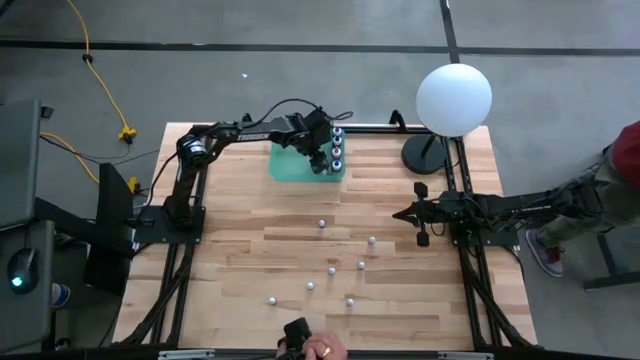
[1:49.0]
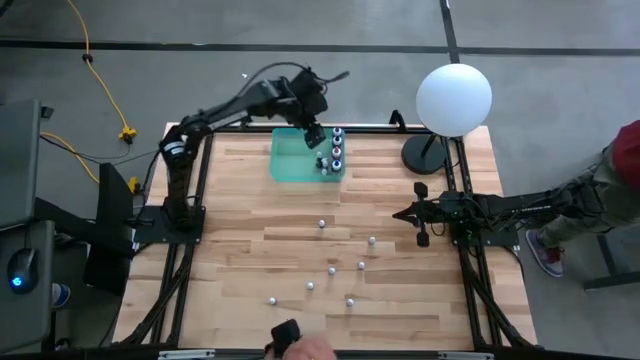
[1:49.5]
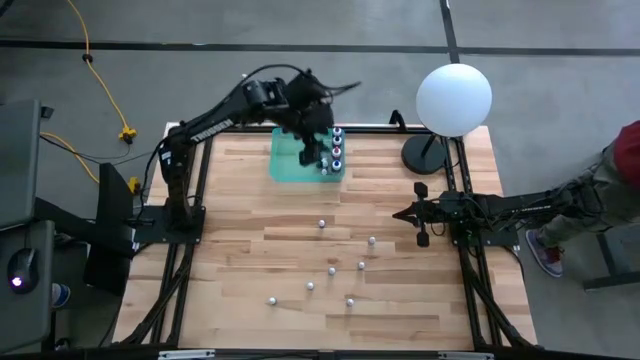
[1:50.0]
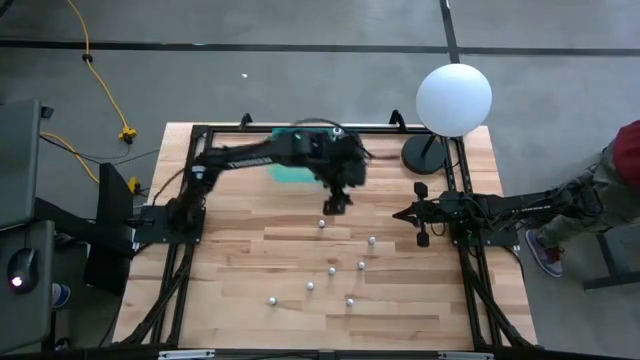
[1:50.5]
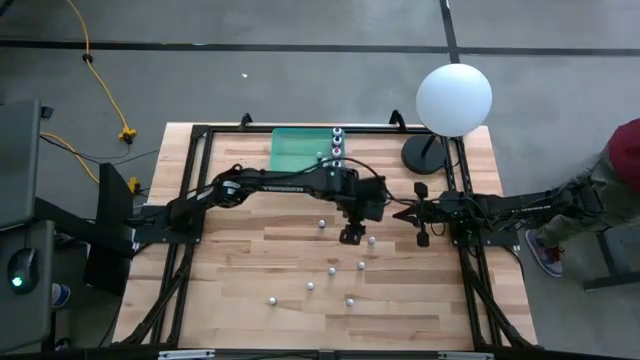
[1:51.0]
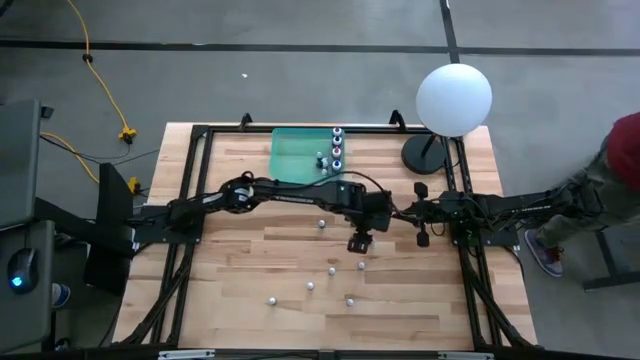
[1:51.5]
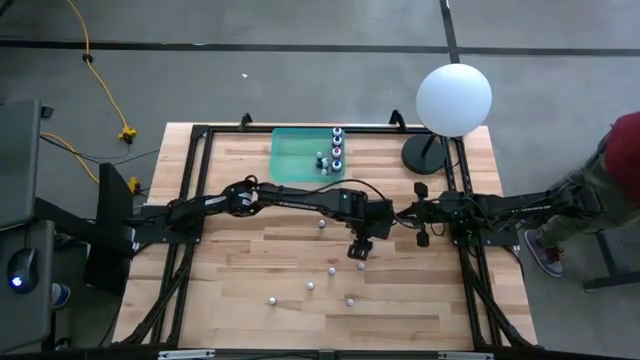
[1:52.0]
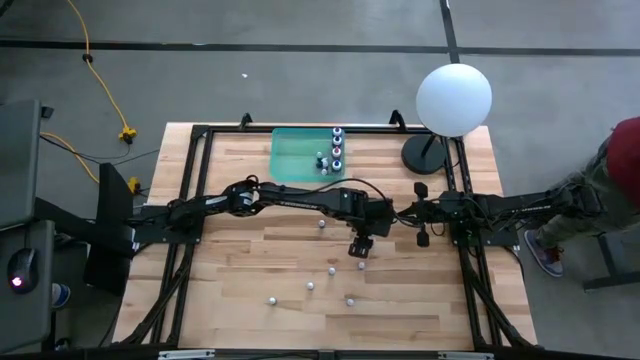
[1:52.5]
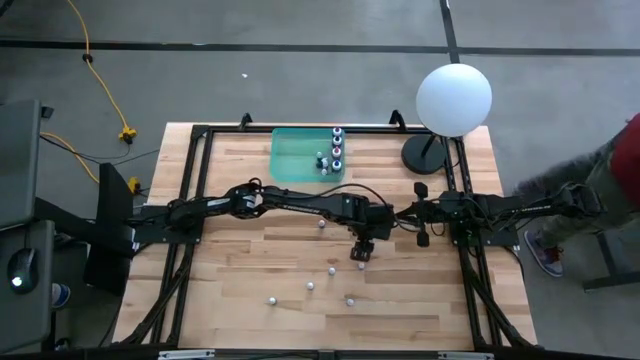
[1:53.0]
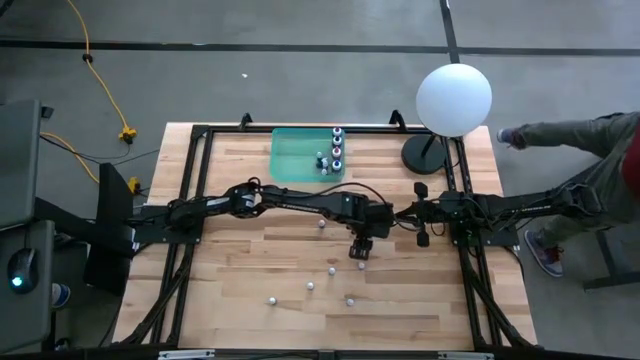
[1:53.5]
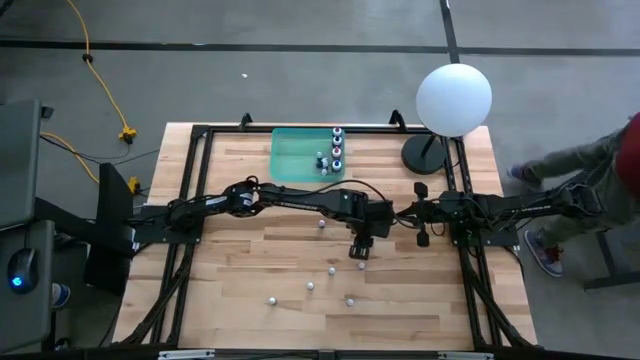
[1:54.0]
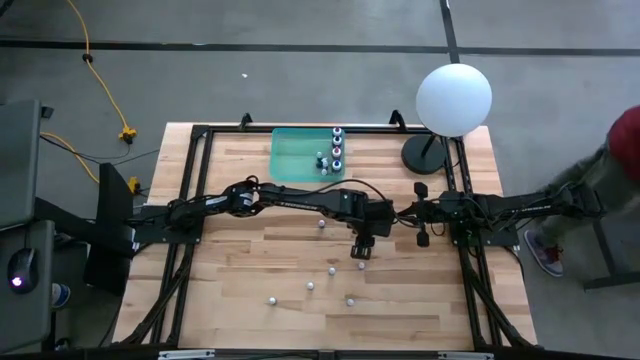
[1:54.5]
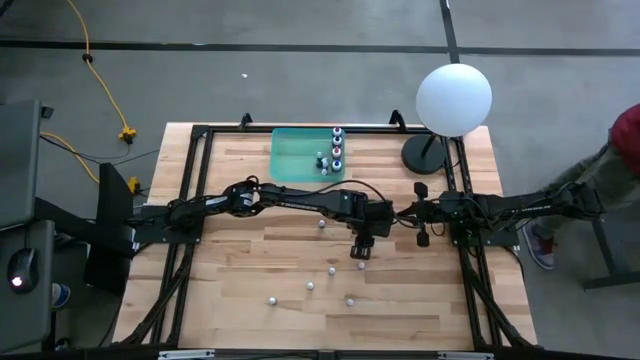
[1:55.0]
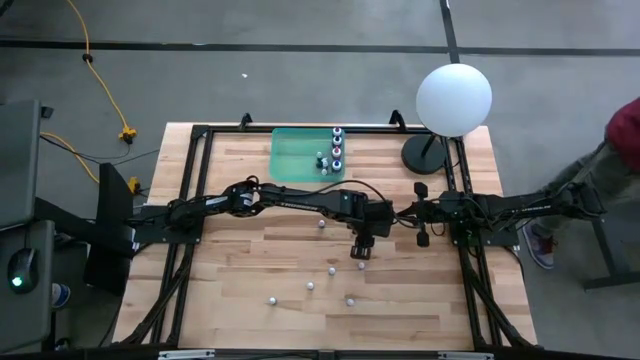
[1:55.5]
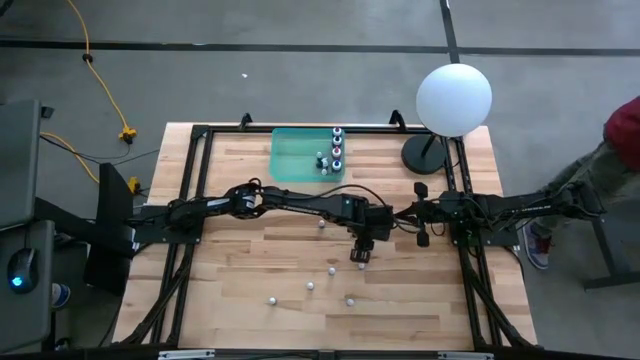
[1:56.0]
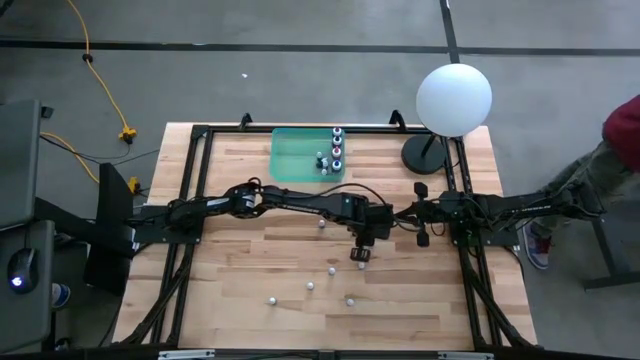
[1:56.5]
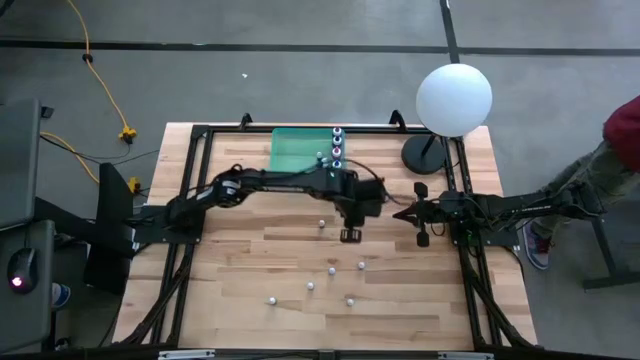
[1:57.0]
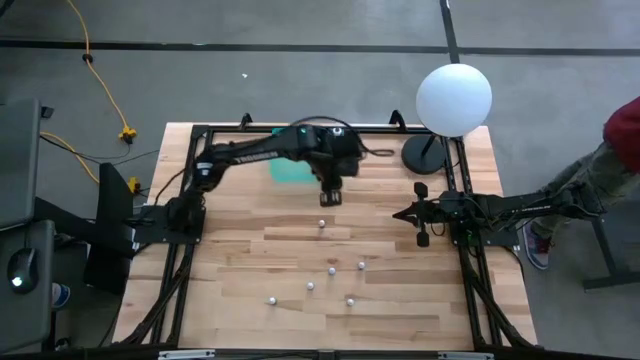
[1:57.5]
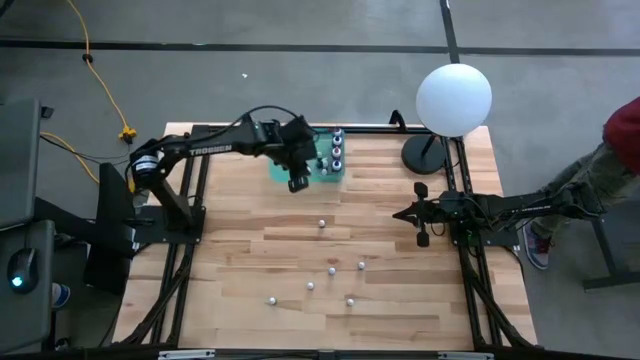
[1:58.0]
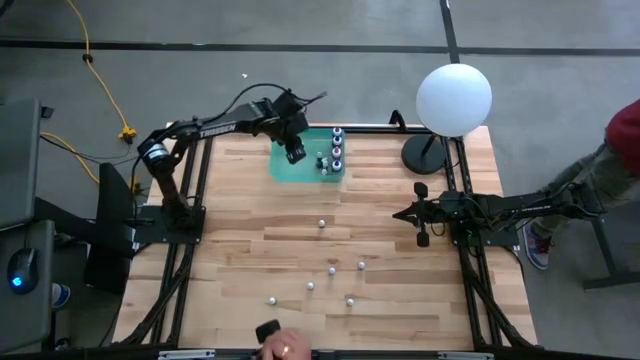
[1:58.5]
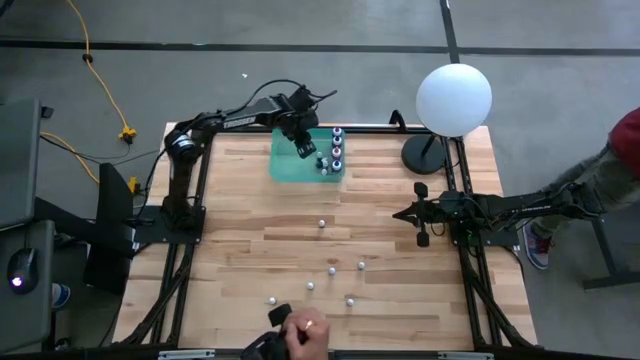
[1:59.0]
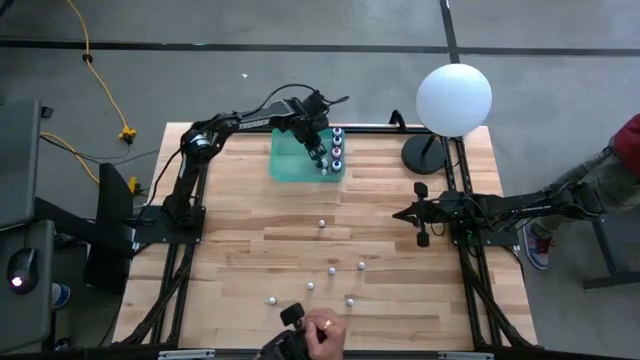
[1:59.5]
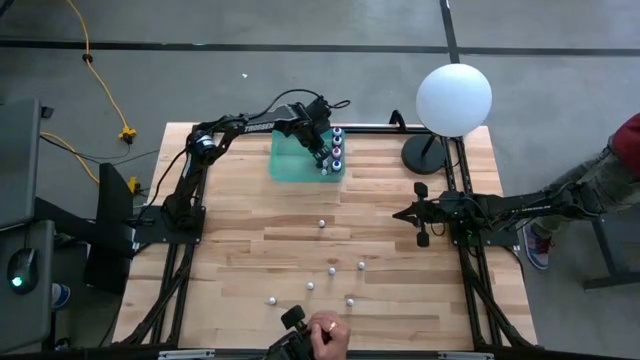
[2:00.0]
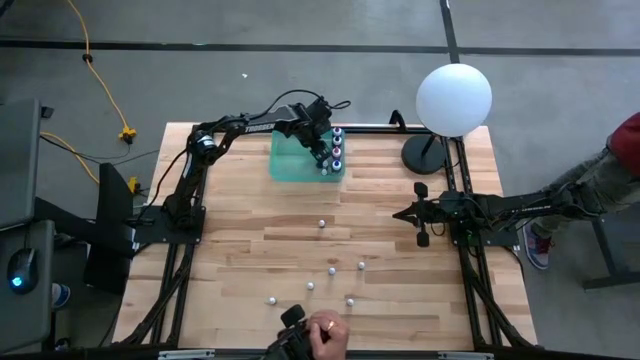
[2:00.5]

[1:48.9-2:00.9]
Task: Pick & Place food coloring
Put the small green food coloring bottle into the blue transparent bin

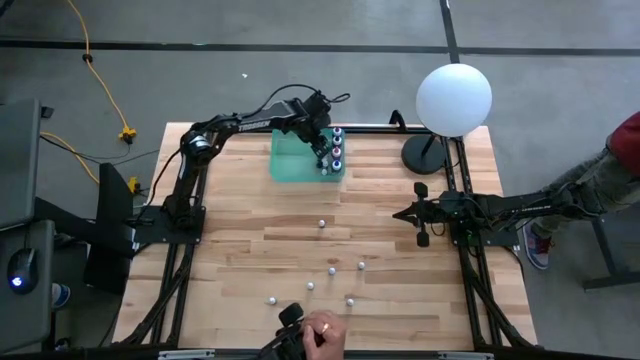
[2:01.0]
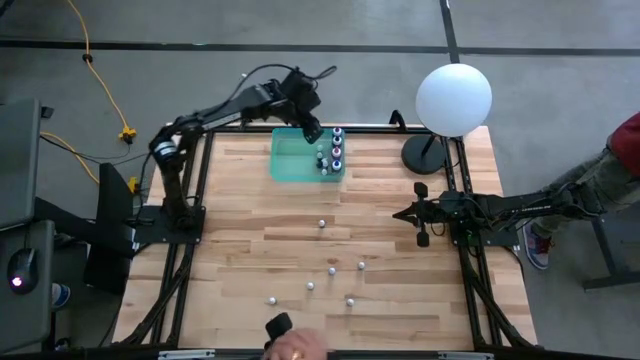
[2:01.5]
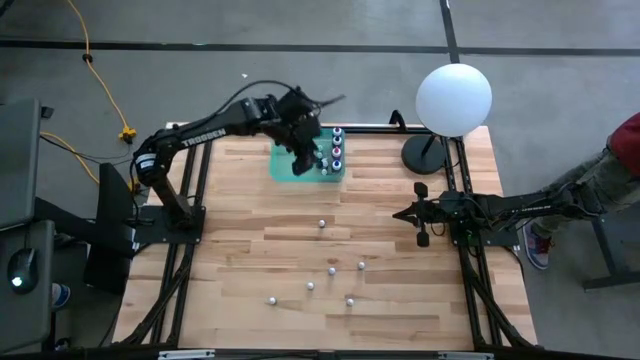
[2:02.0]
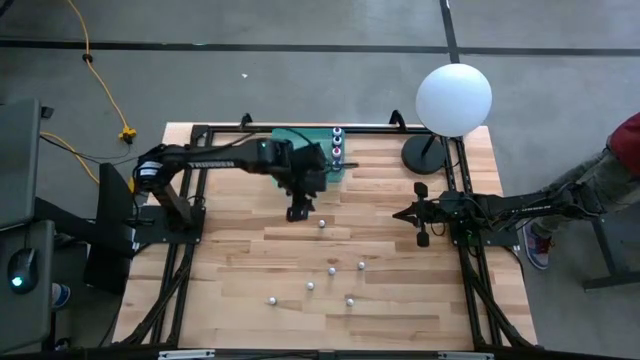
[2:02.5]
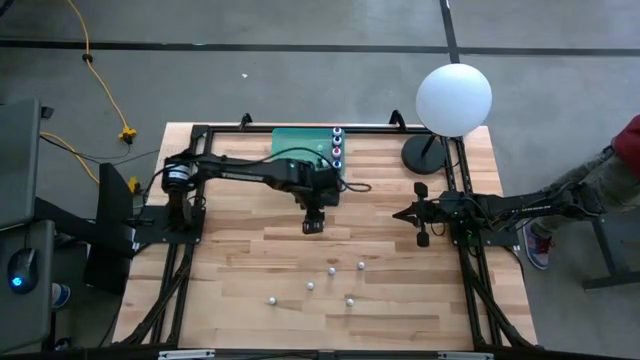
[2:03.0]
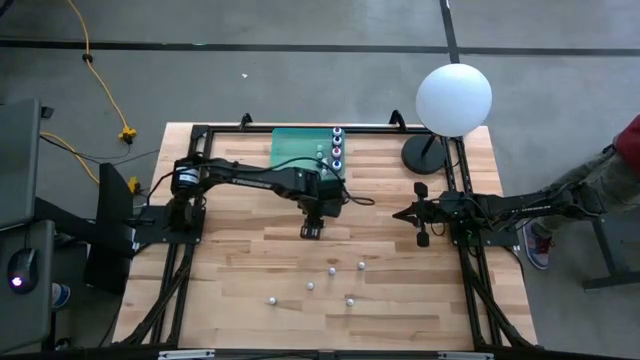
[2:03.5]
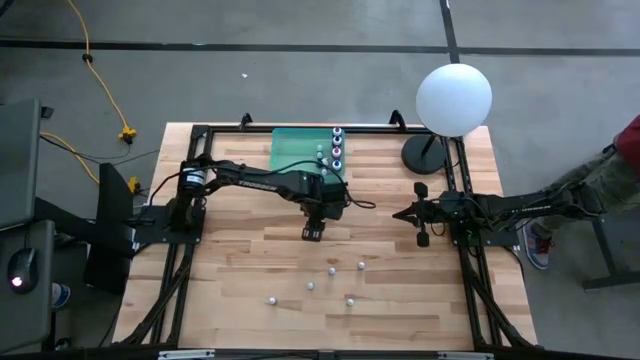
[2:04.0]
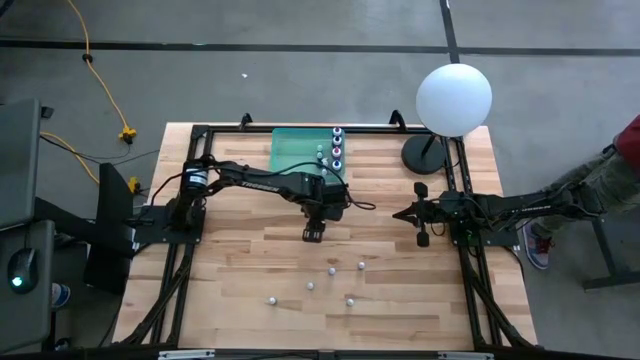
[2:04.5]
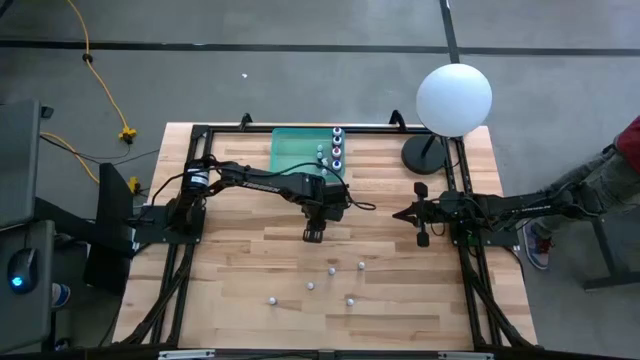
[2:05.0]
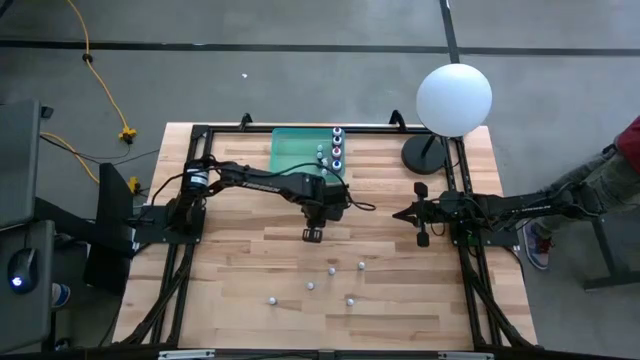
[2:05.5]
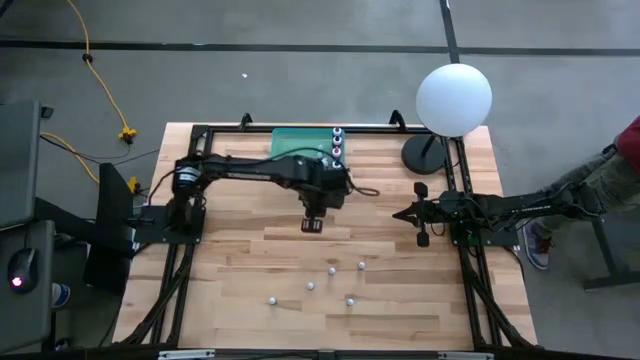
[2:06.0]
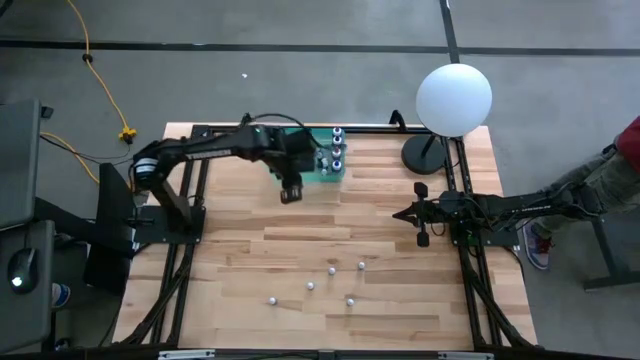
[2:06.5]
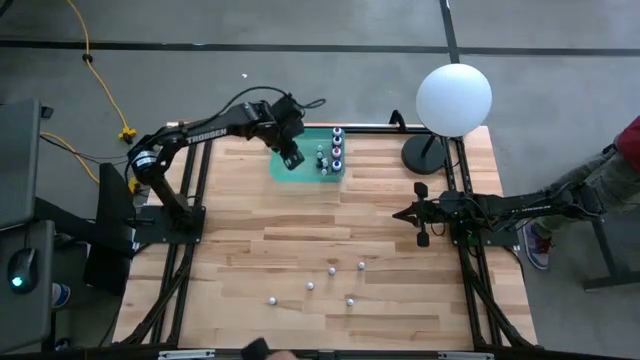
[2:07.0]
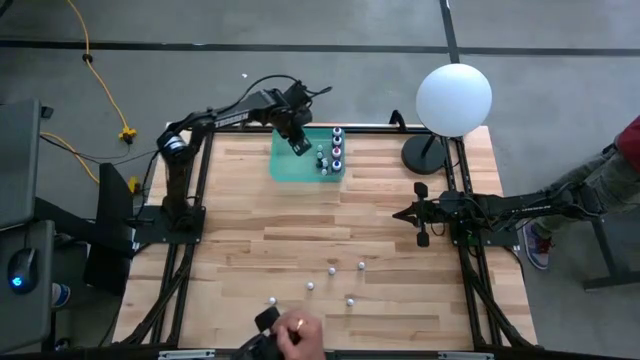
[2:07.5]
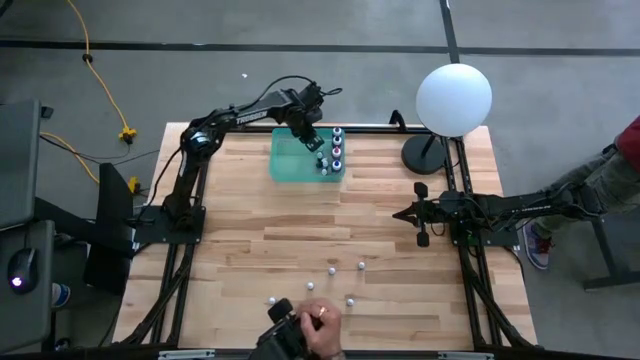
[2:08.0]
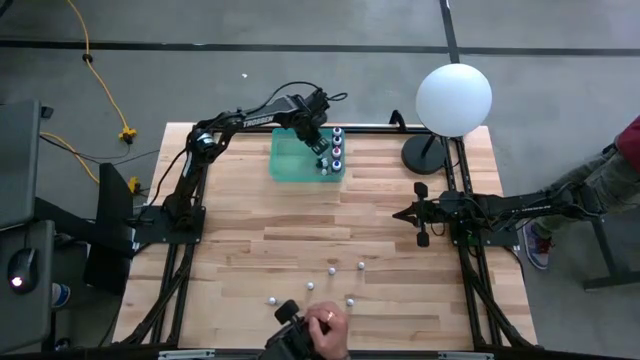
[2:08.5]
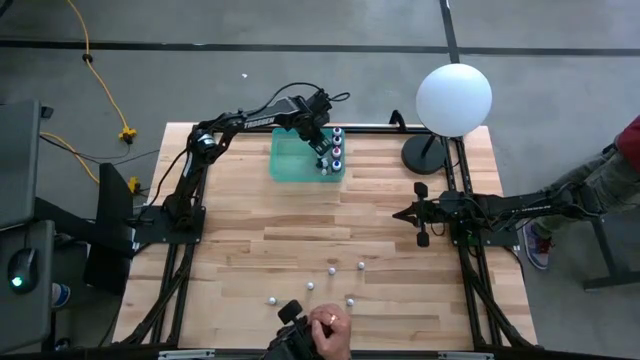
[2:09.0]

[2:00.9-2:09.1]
Put the small green food coloring bottle into the blue transparent bin
